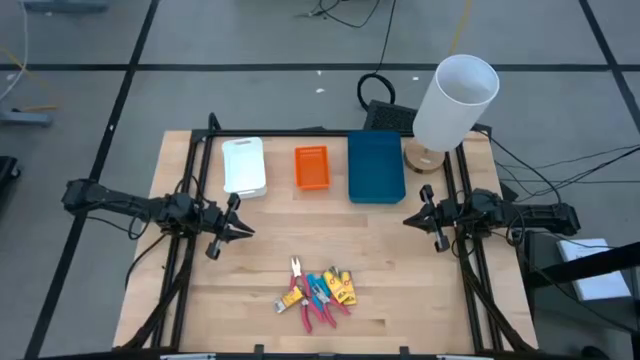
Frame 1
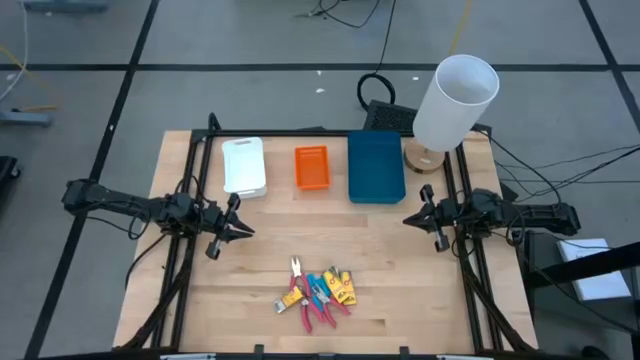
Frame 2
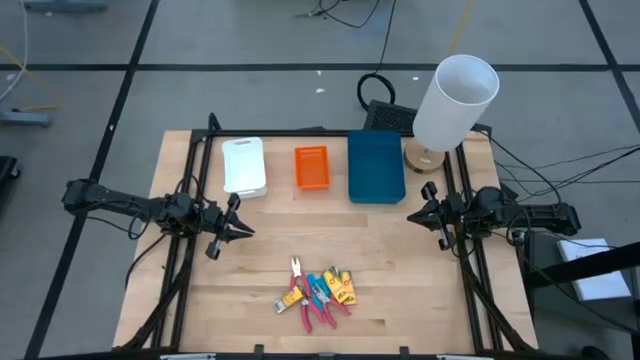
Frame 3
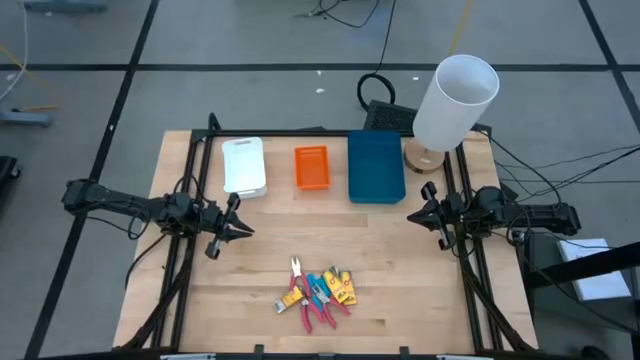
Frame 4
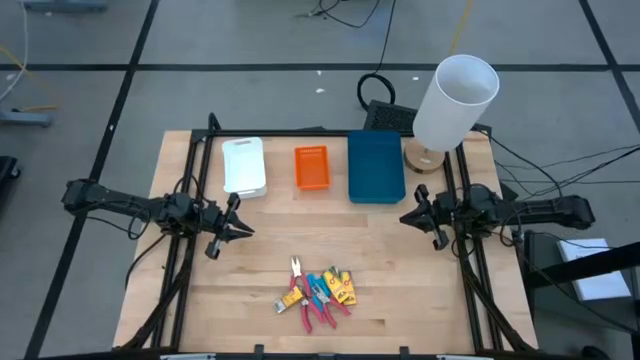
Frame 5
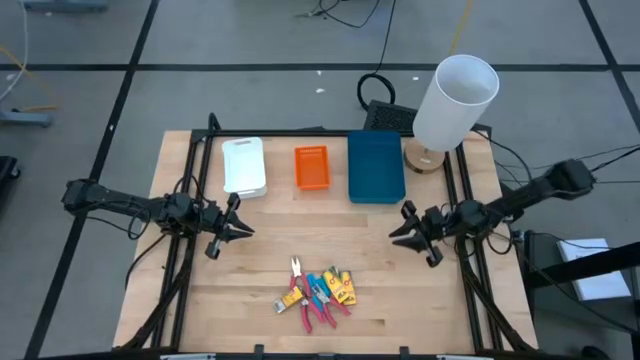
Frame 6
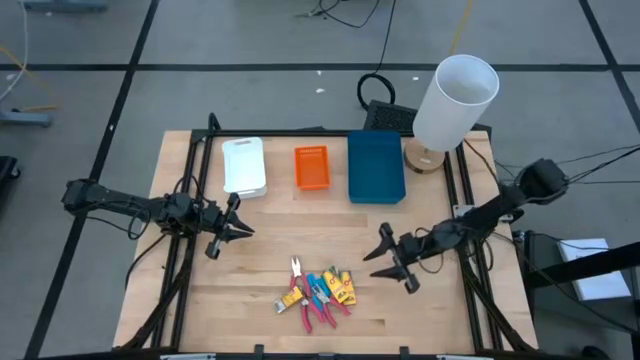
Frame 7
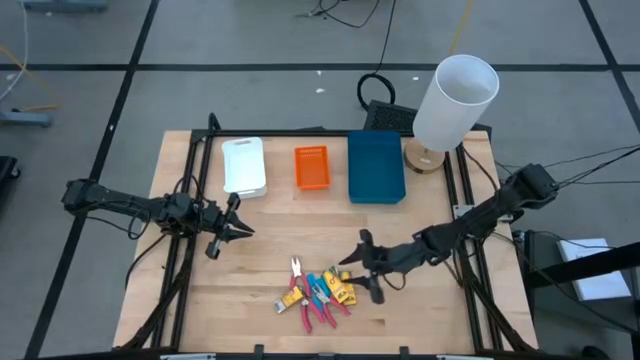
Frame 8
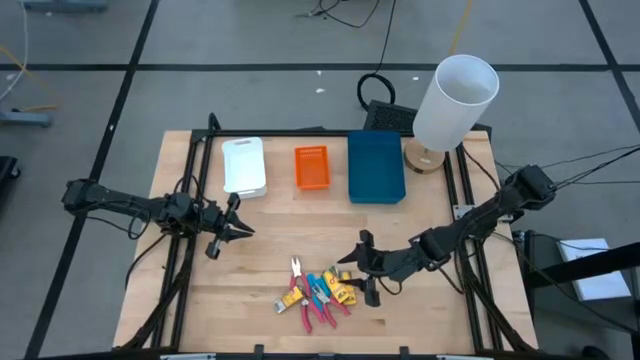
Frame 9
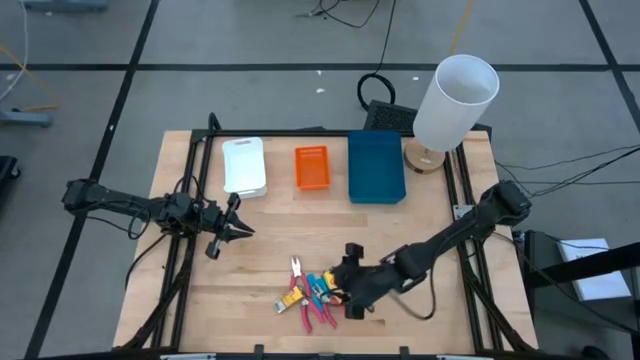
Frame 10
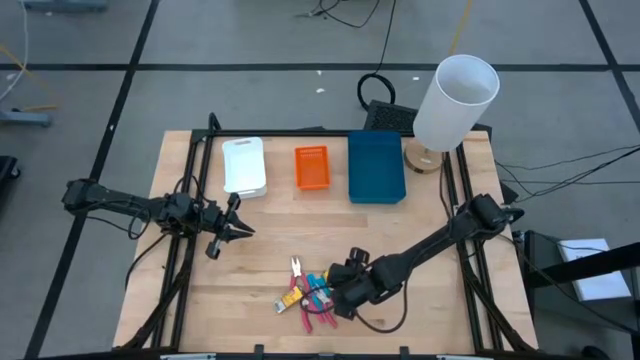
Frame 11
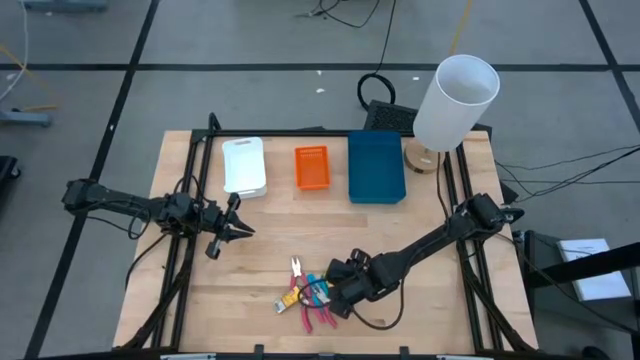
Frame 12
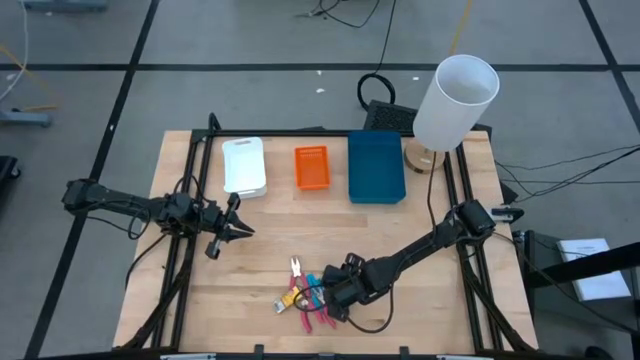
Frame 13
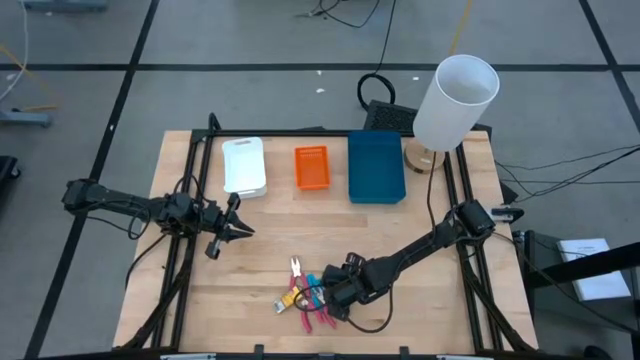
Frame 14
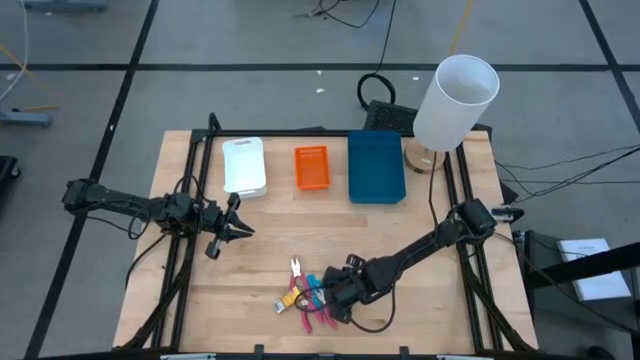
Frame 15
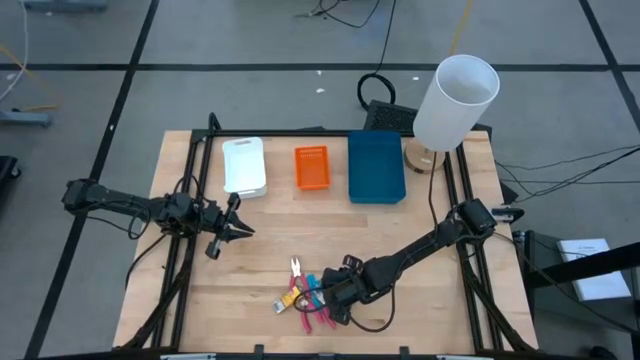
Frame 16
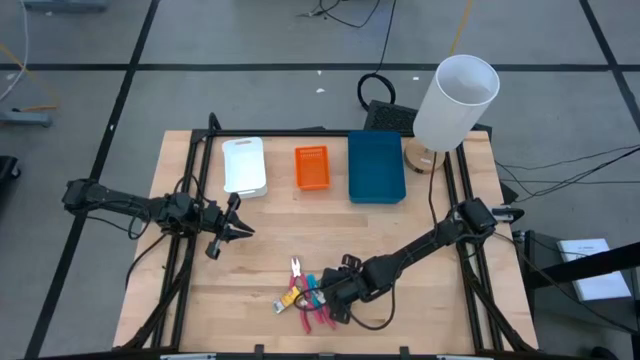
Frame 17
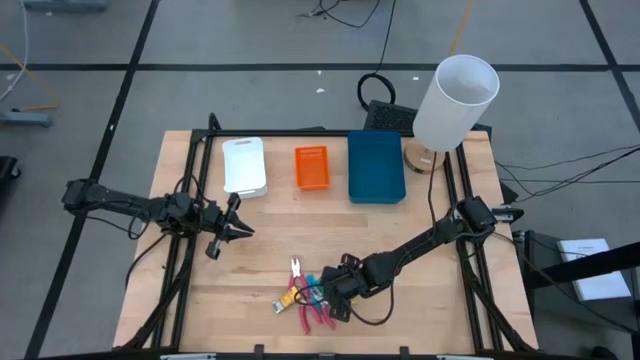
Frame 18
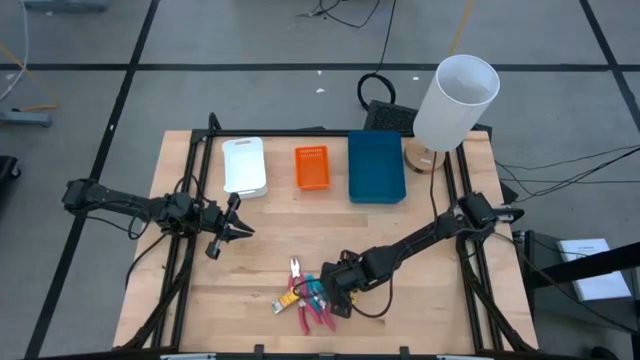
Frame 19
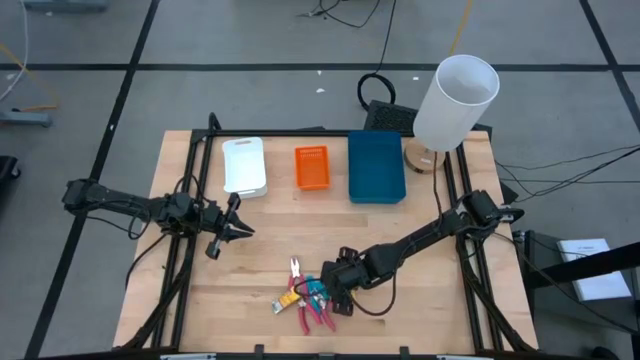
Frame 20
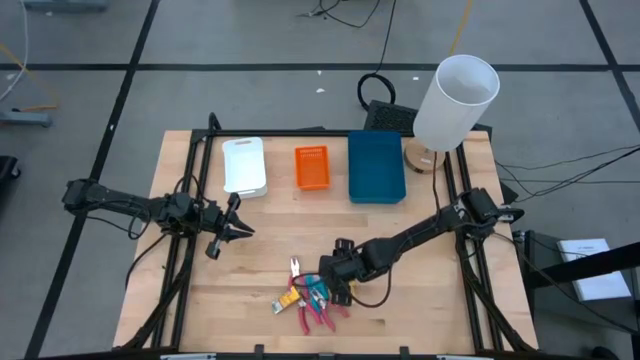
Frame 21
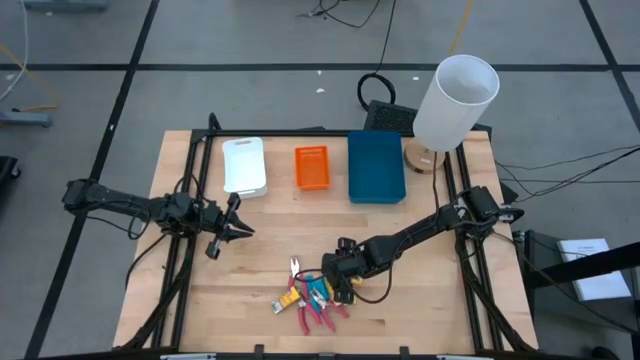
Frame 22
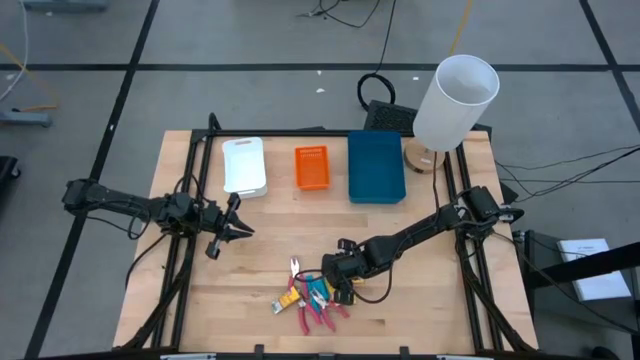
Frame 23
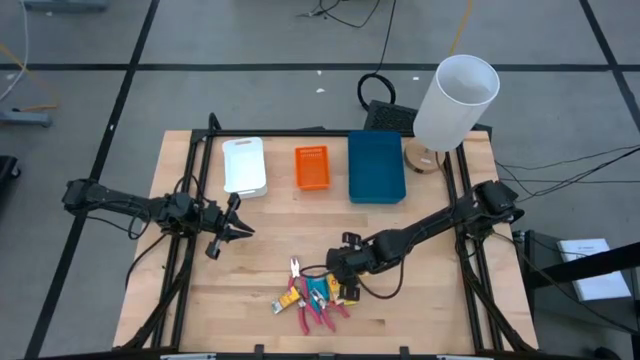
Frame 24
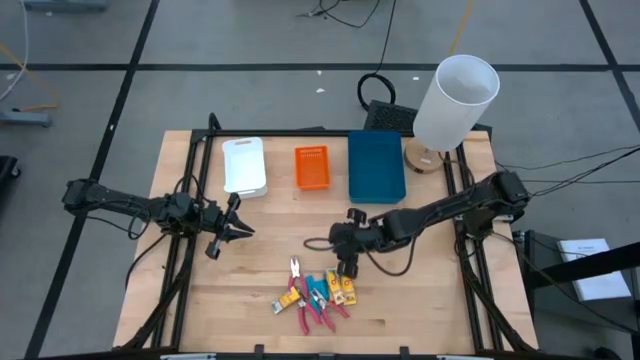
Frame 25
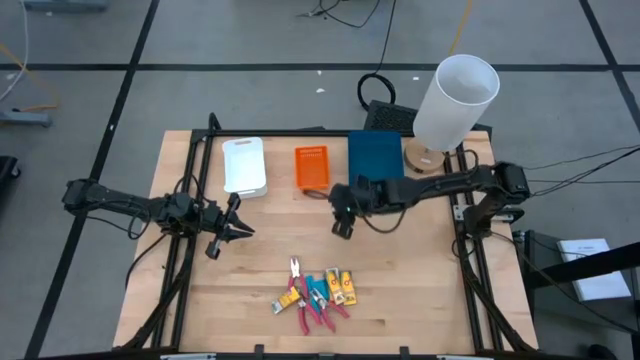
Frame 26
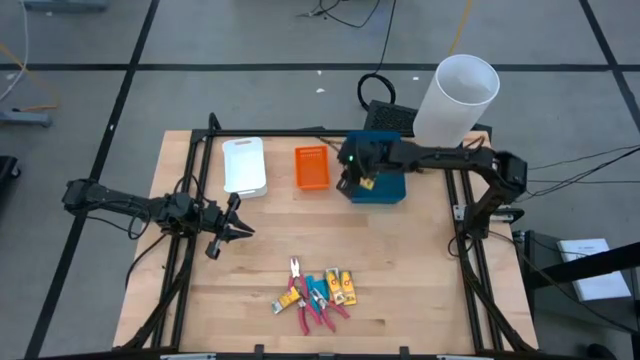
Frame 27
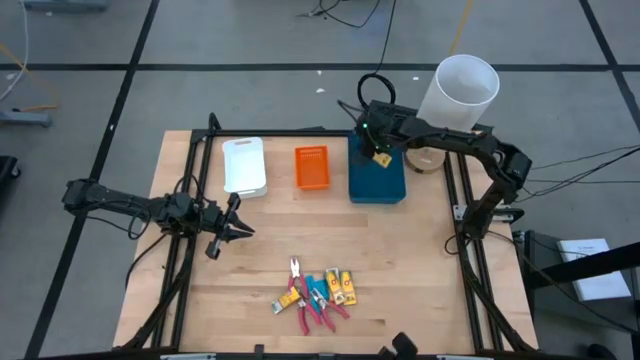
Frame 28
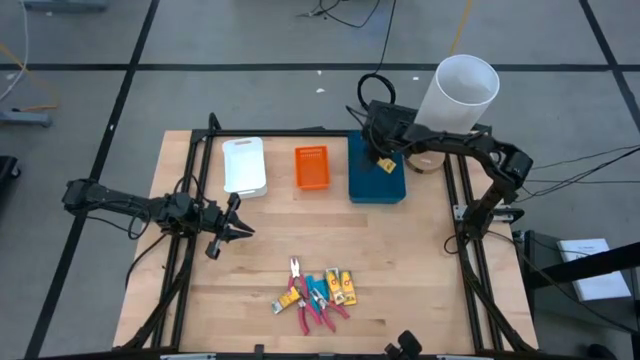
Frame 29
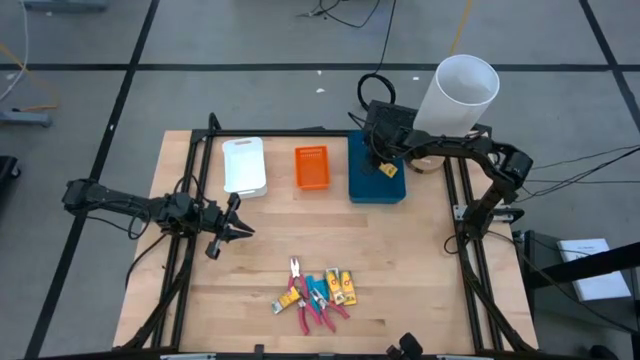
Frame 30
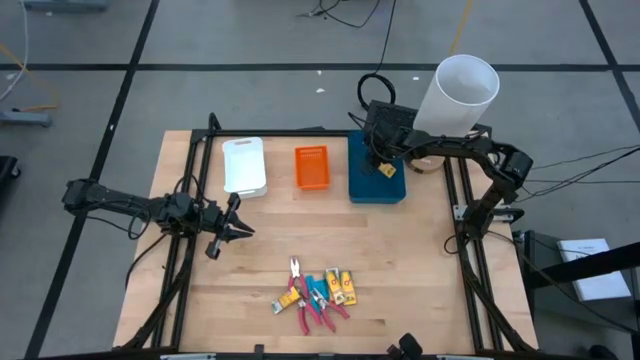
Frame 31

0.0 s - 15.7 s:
Task: Pick & Place School Supplies
Put the crayon box into the blue bin
